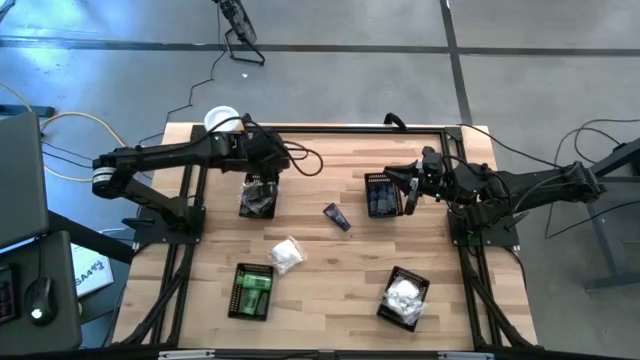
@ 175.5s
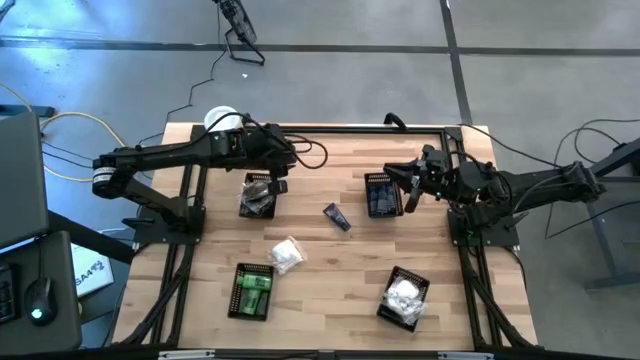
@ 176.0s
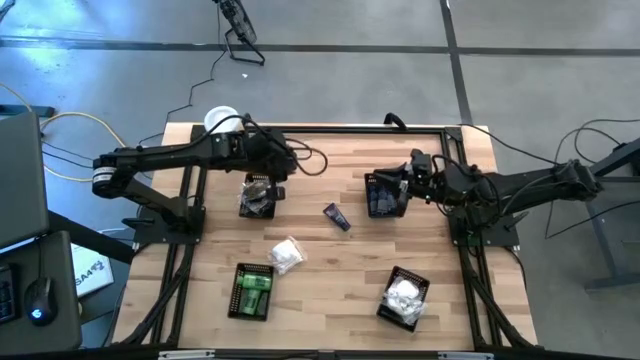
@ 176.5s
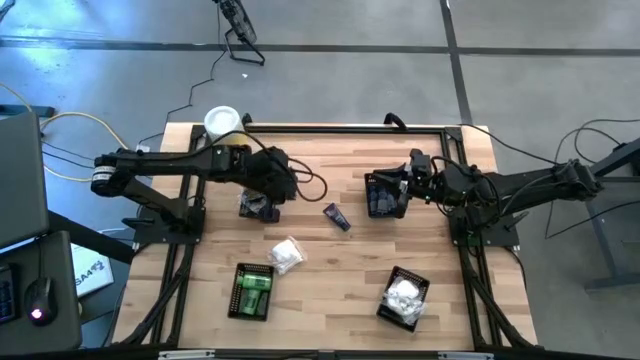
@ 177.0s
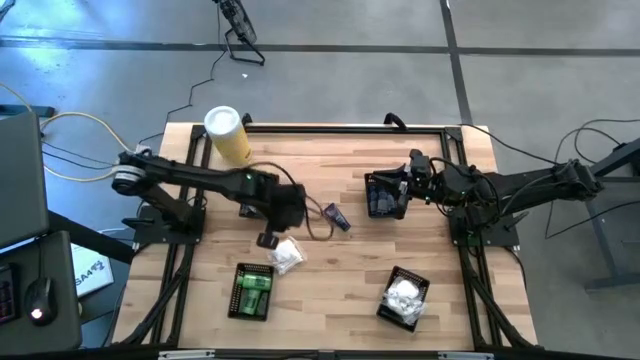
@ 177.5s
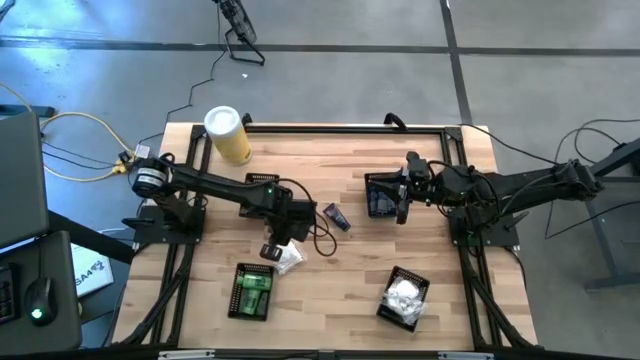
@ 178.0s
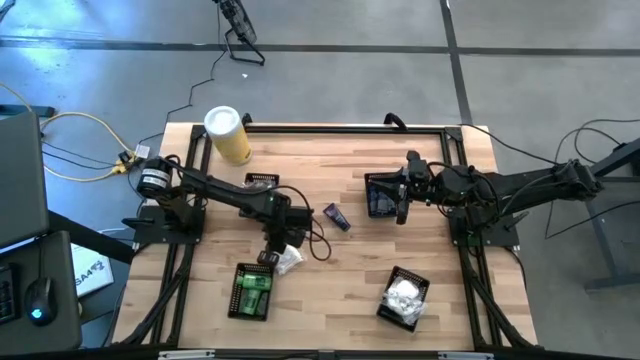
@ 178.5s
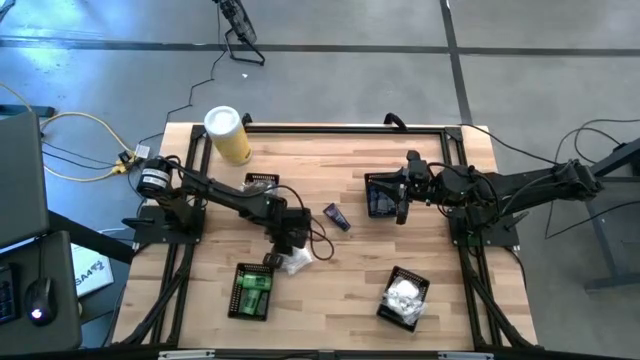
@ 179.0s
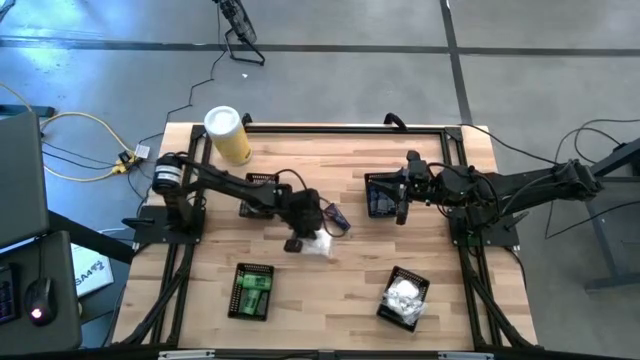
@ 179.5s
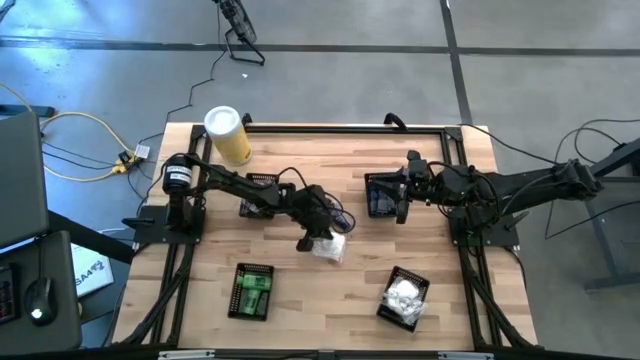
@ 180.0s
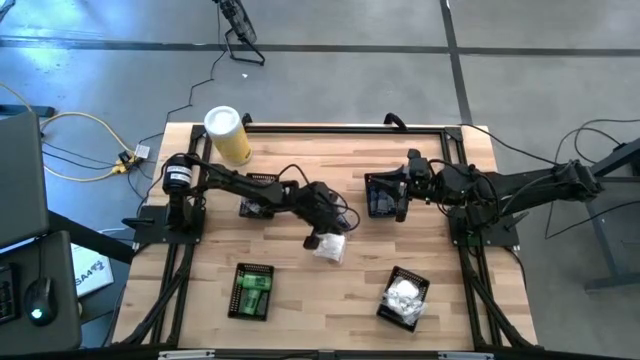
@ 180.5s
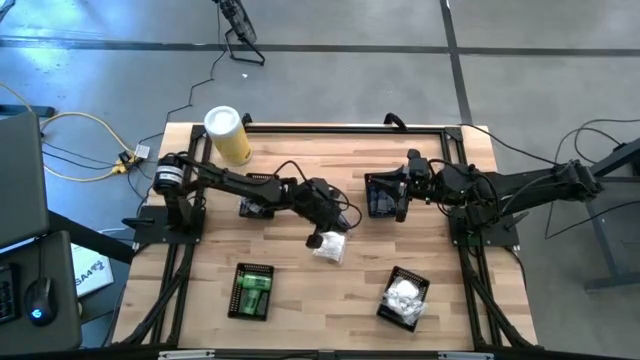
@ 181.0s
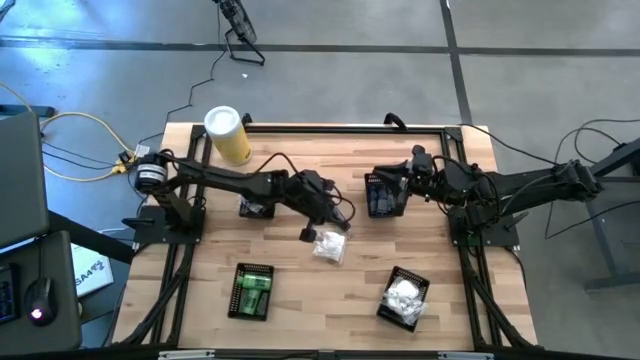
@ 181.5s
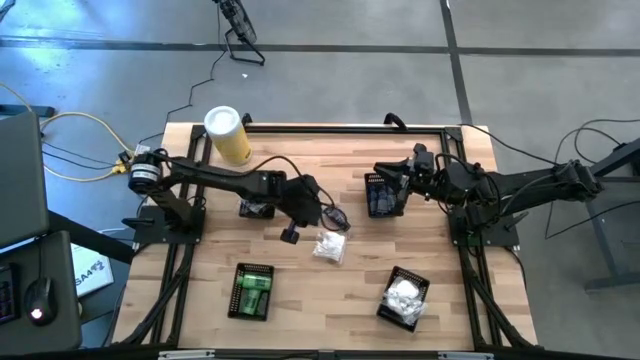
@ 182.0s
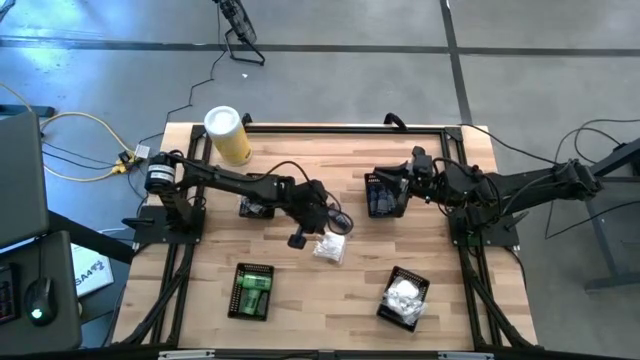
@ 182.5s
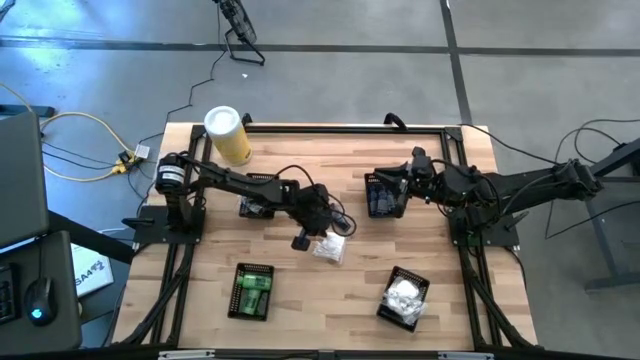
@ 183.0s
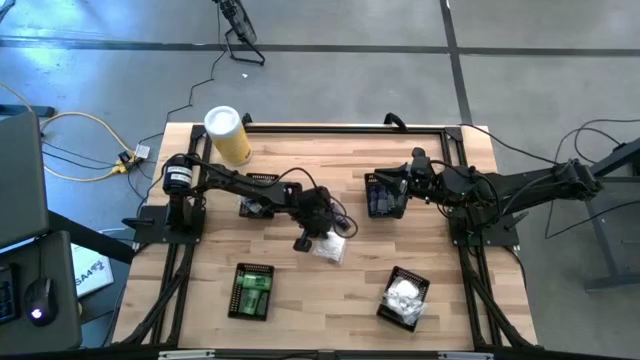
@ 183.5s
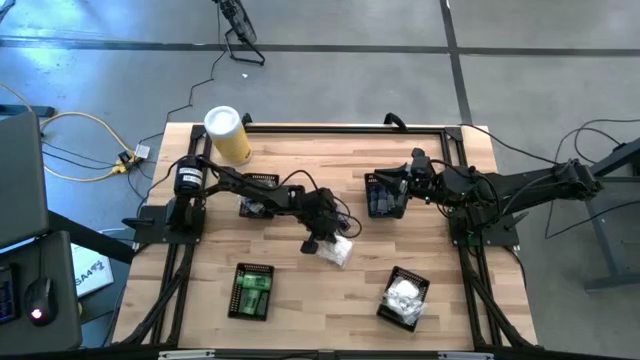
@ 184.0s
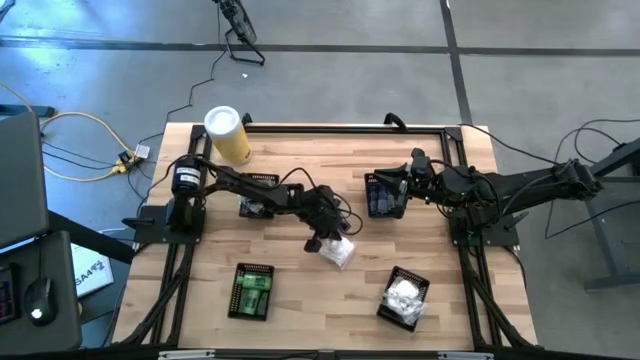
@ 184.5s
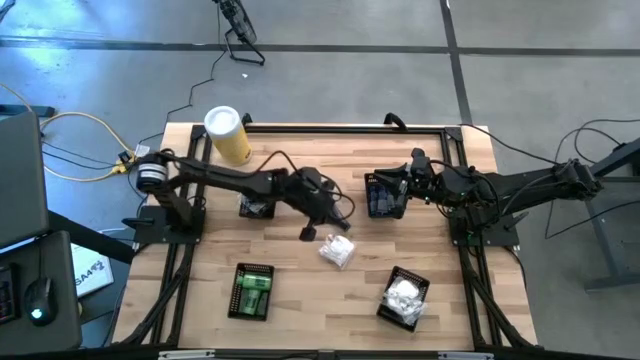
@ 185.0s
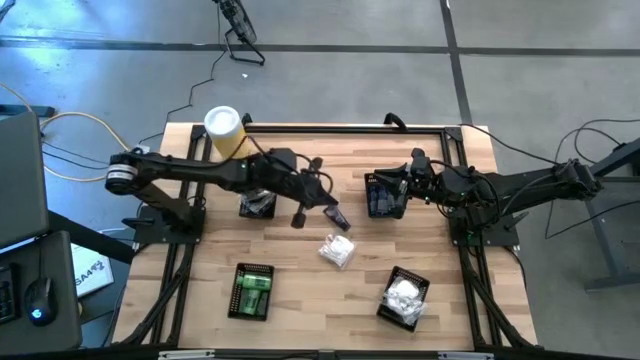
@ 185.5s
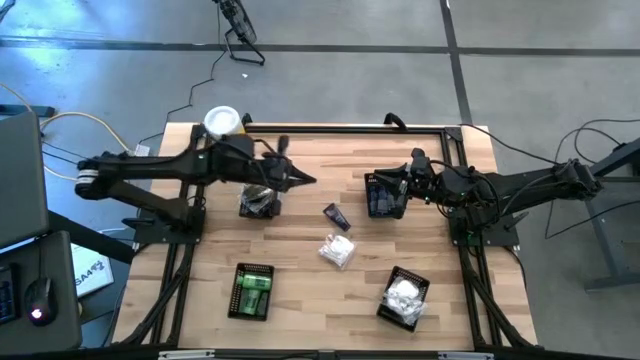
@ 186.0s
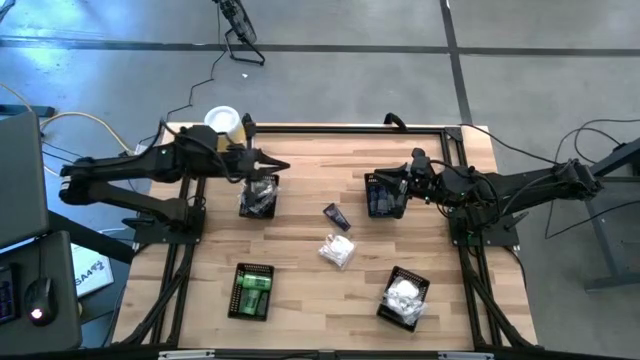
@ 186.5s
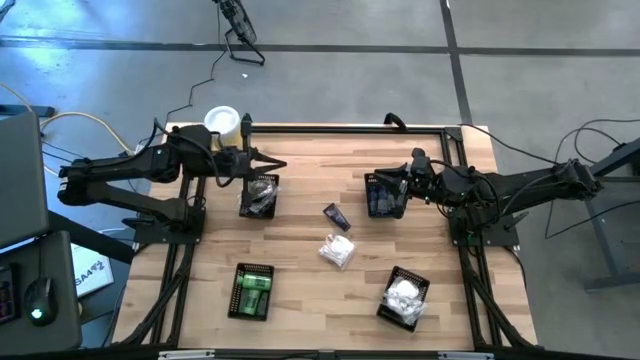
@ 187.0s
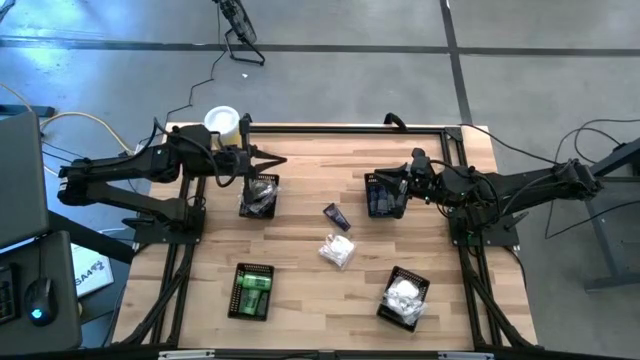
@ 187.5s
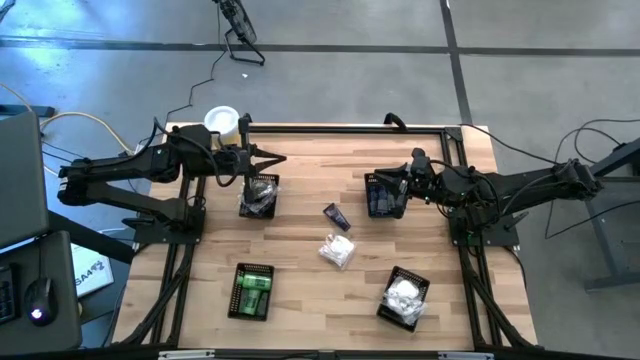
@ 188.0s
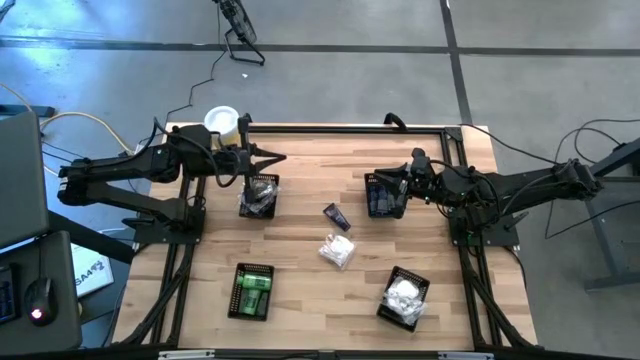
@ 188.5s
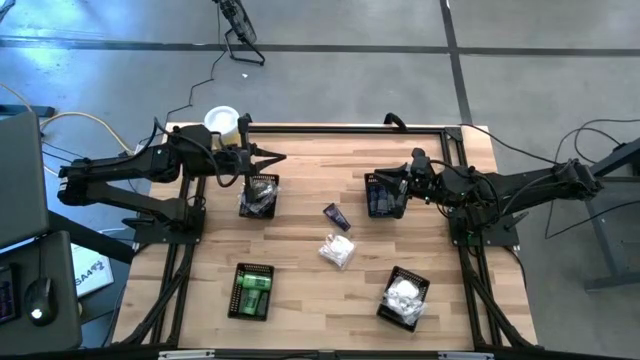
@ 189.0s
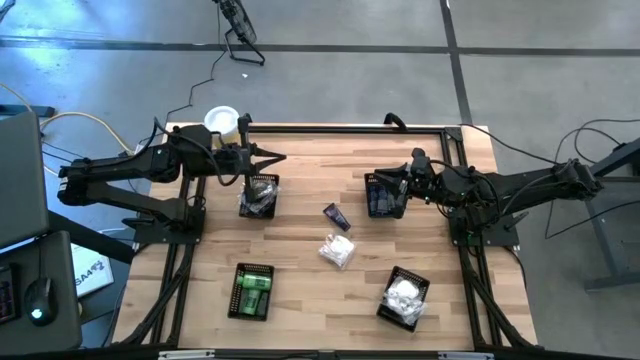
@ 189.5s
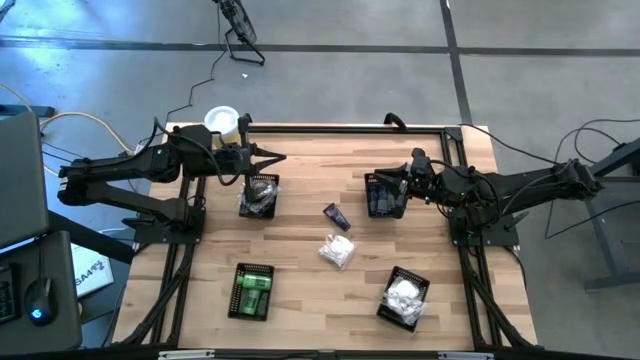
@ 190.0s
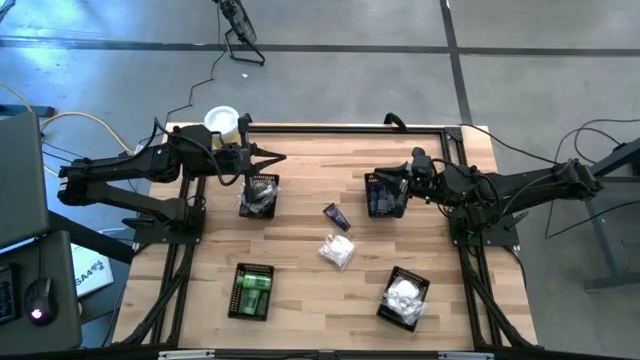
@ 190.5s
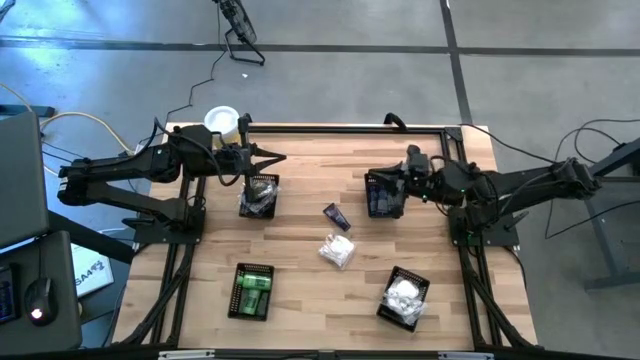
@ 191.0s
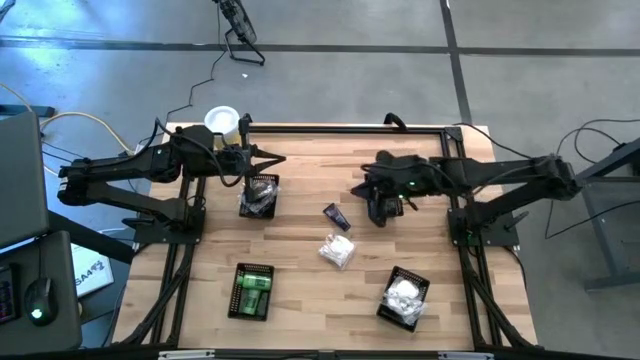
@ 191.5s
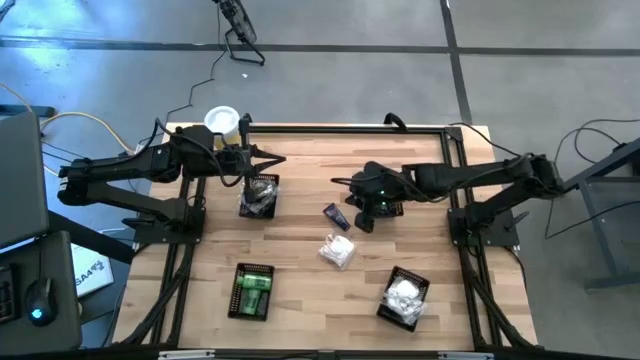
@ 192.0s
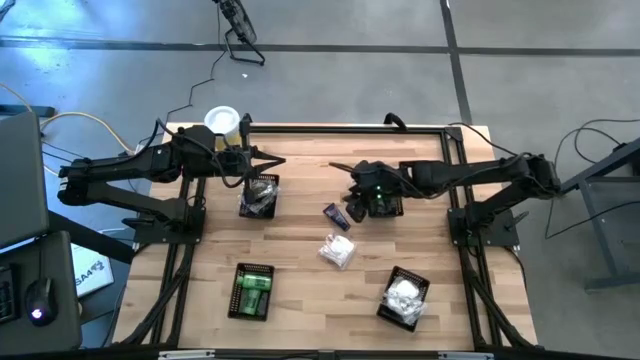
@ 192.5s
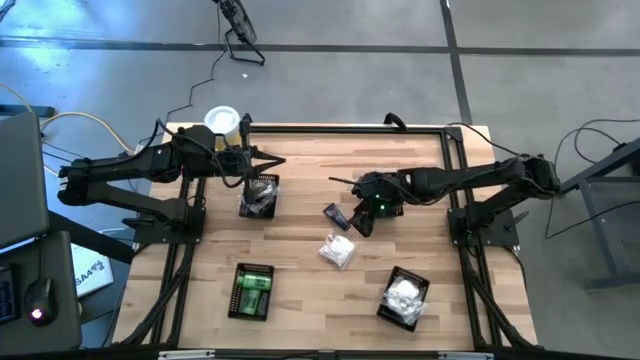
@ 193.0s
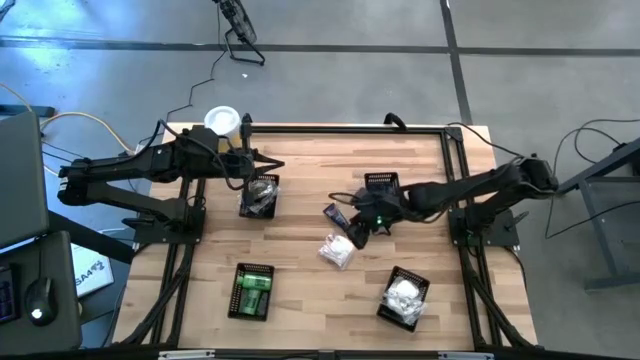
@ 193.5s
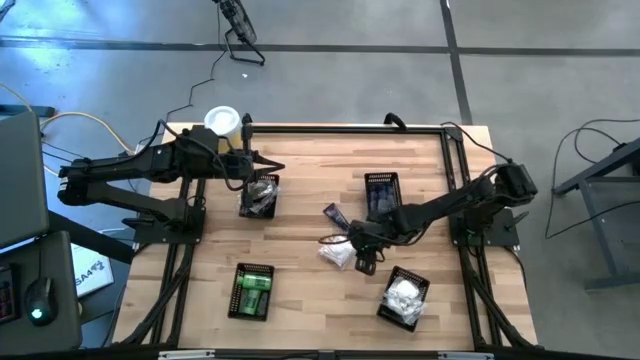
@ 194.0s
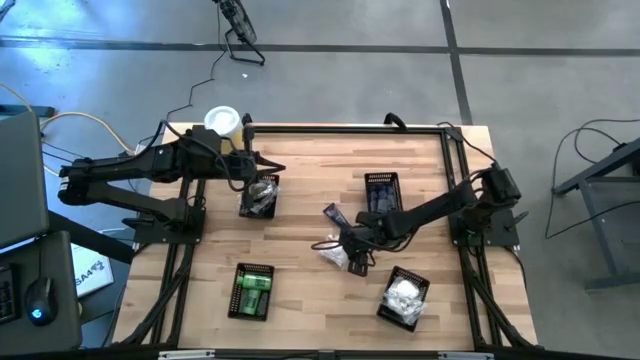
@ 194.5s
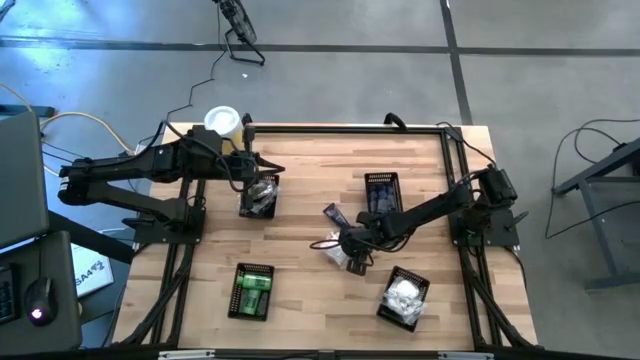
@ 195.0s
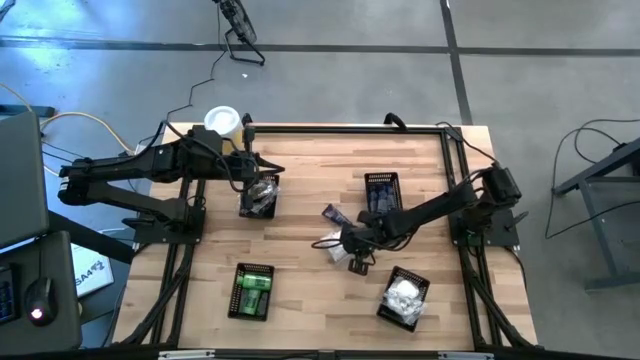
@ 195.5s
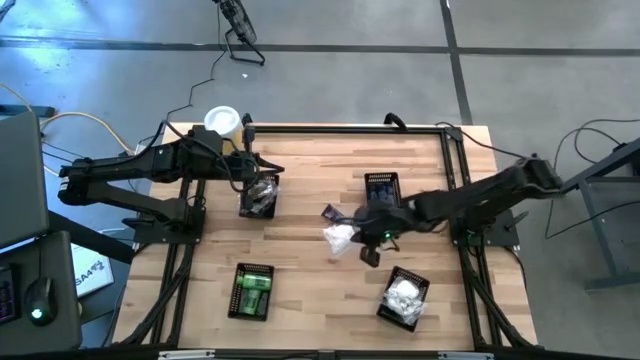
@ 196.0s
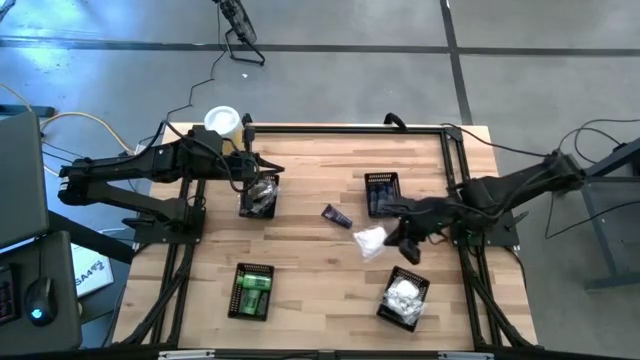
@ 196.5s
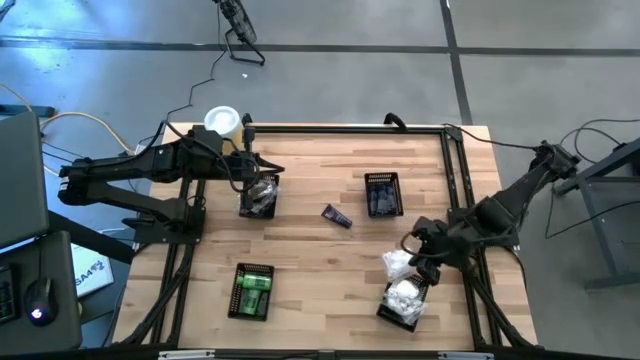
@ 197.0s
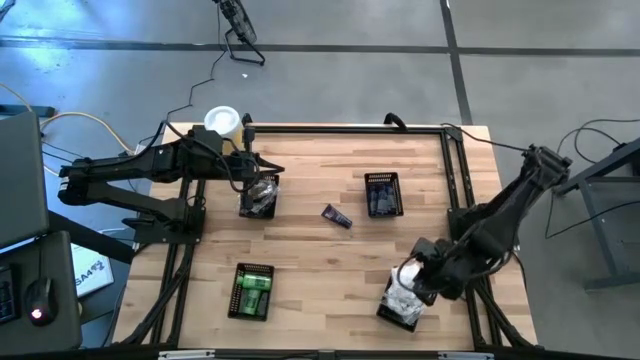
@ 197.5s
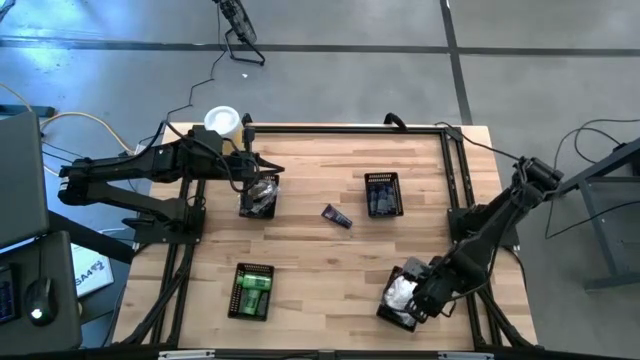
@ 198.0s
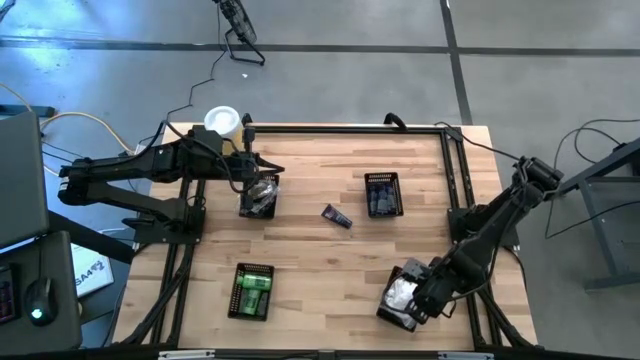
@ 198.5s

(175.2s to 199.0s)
Task: Pick & Place Travel size toiletries
Put the white cotton pack into the bottom right black basket
